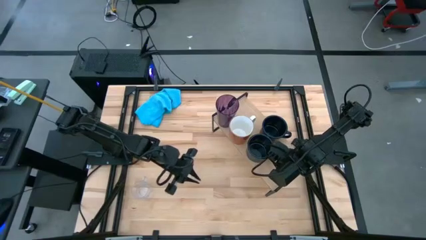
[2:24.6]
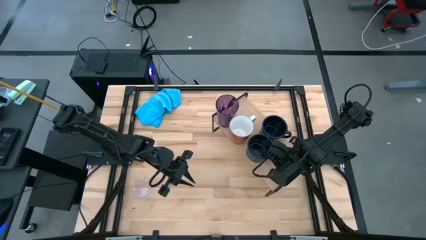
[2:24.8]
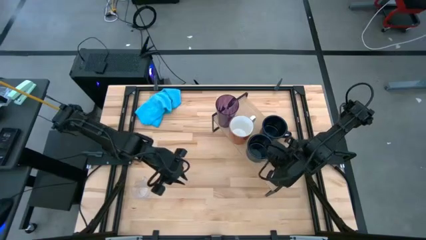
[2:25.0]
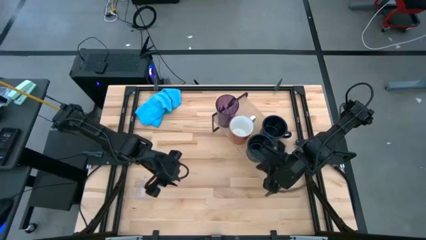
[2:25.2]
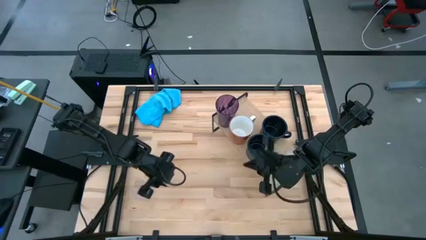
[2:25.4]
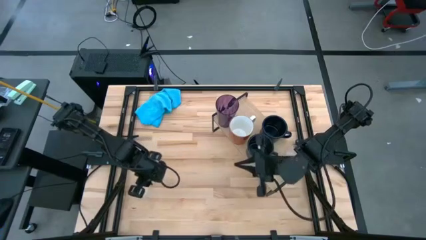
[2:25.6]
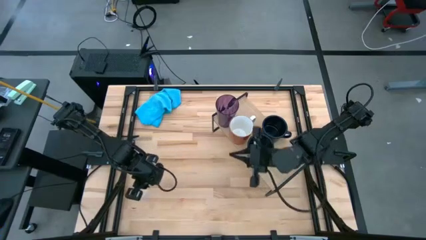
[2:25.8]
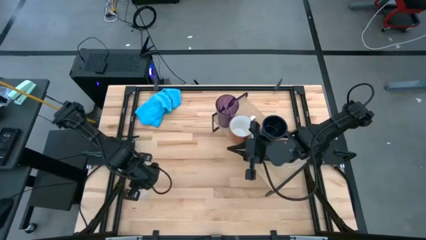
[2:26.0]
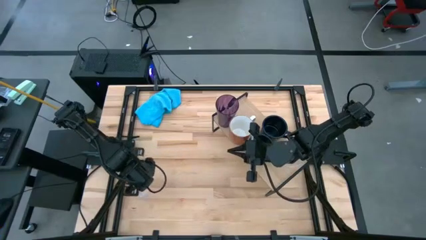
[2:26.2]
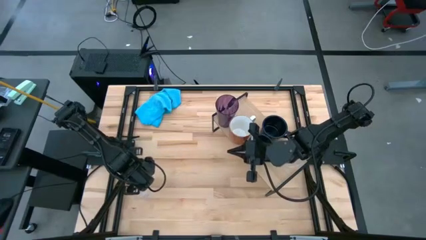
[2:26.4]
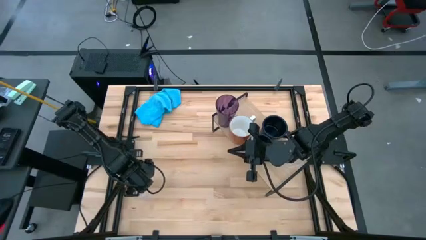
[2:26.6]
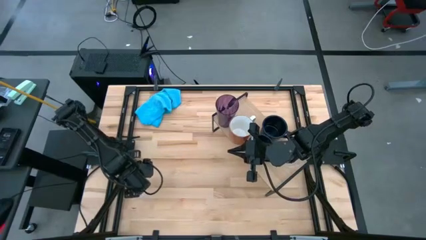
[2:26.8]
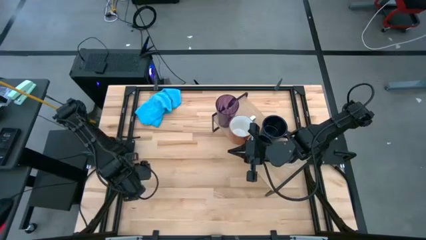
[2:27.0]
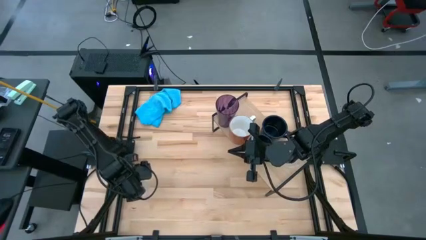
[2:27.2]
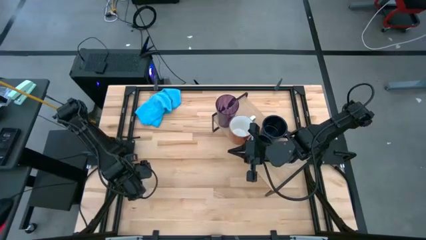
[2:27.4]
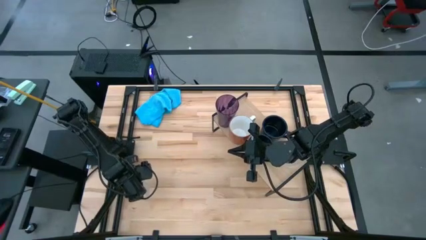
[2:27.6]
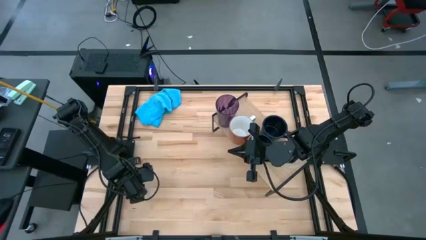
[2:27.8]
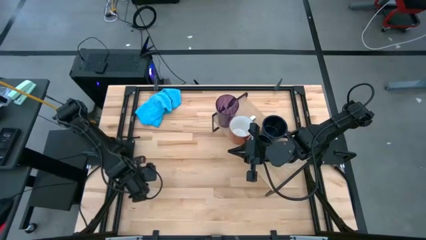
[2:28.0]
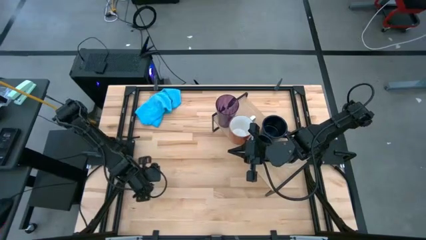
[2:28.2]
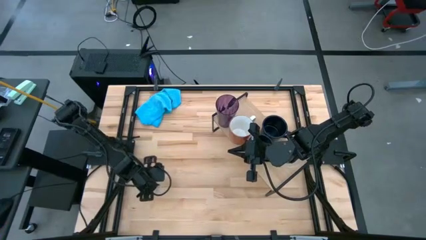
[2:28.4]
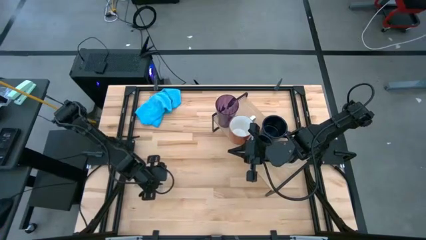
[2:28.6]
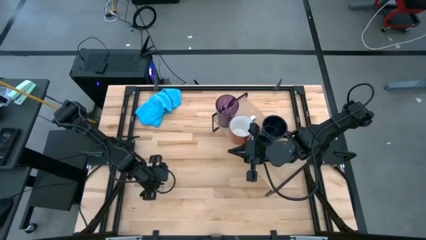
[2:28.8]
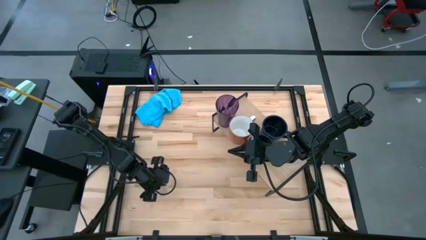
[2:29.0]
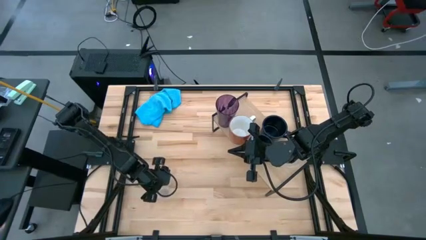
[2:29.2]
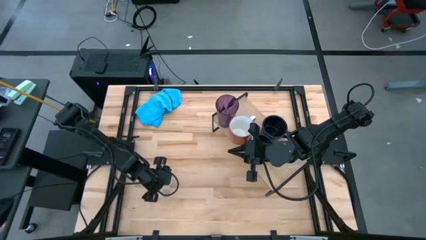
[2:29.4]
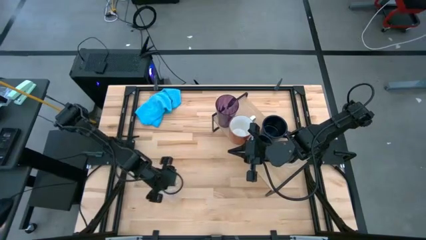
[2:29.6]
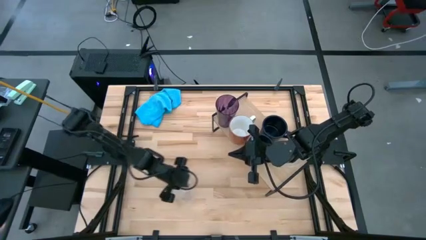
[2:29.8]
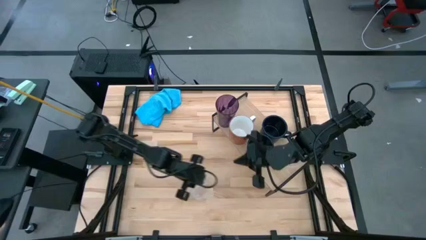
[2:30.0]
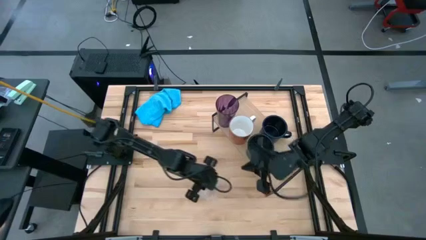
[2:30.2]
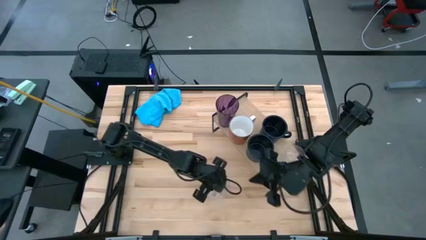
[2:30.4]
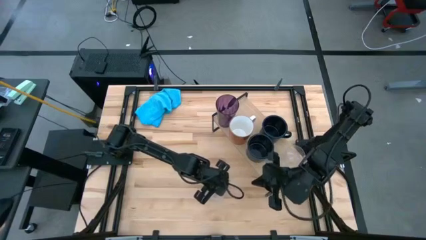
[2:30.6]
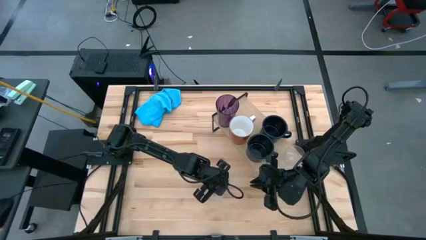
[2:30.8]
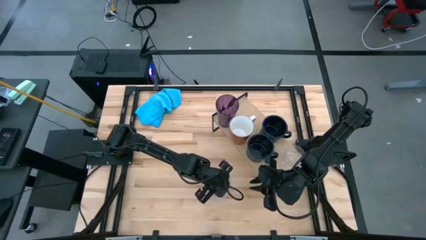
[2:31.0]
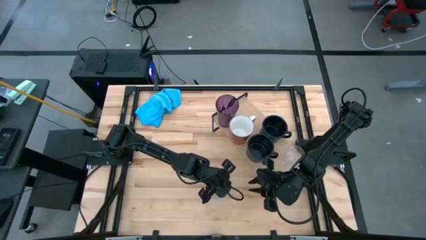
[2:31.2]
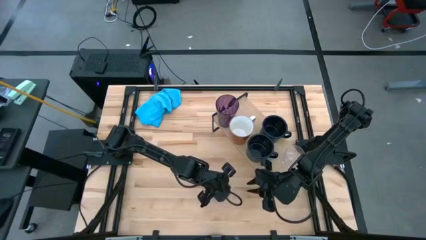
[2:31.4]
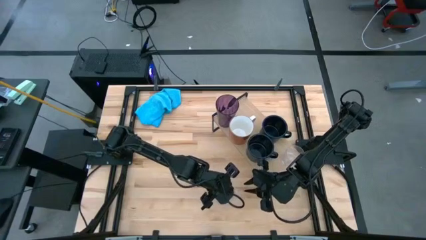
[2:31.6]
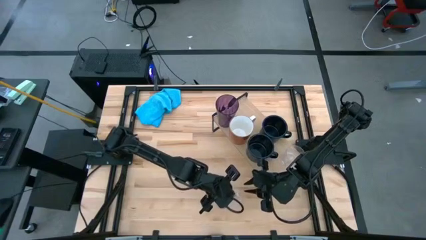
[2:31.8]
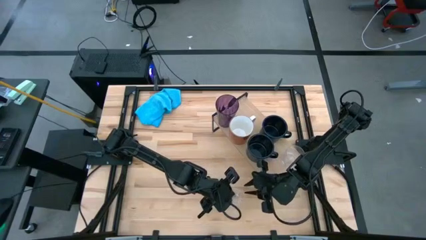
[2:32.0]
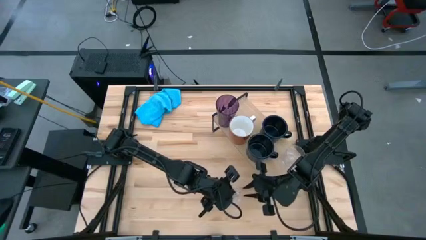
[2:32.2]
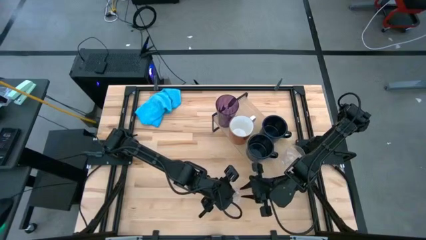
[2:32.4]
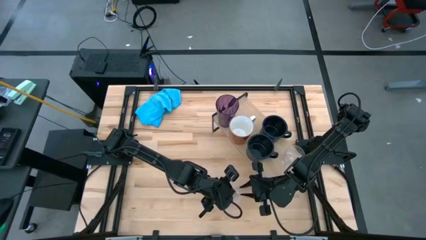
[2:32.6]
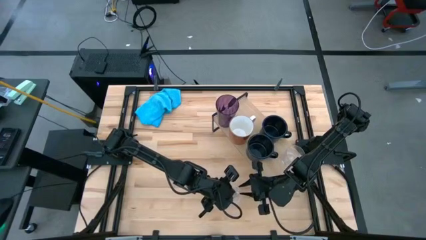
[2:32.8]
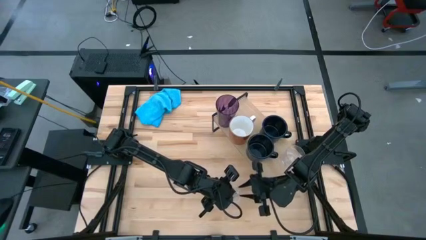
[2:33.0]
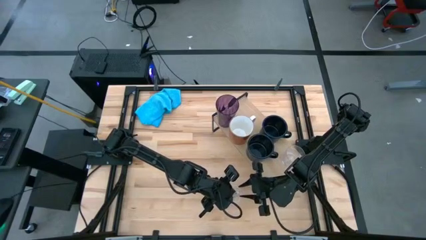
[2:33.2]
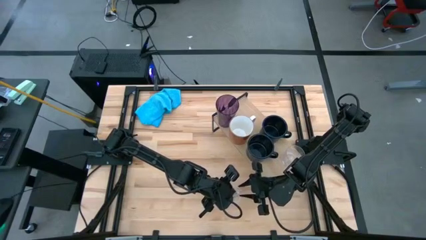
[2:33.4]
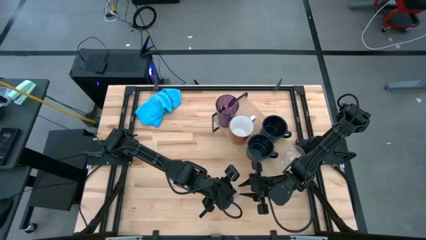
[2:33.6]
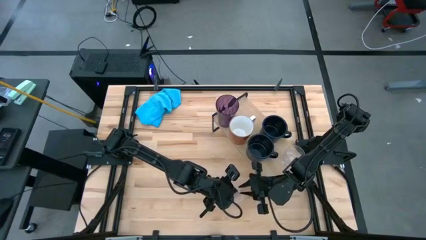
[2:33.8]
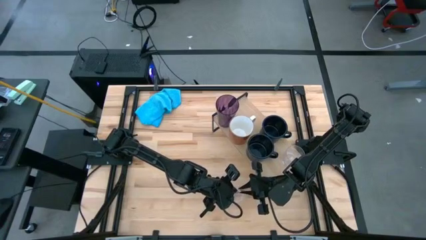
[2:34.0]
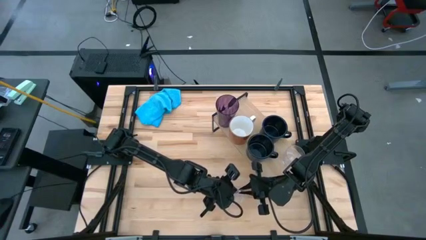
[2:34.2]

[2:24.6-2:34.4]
Task: Stack small to large cups/mugs on shelf
Put the transparent mug on the shelf aligned with the other transparent mug

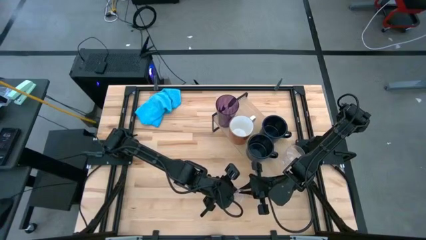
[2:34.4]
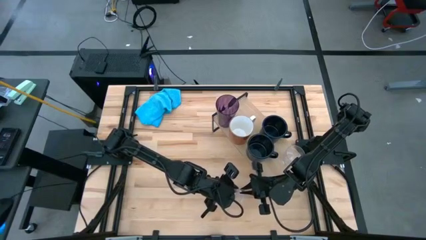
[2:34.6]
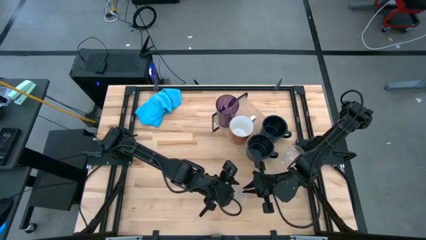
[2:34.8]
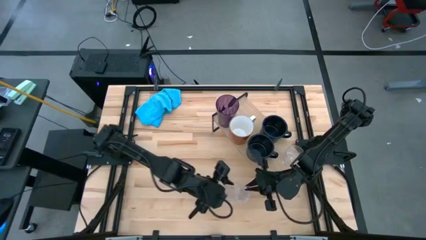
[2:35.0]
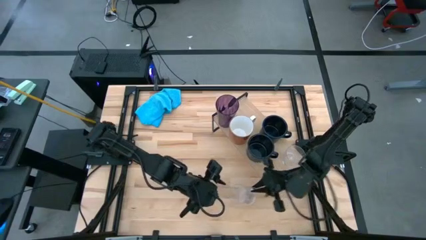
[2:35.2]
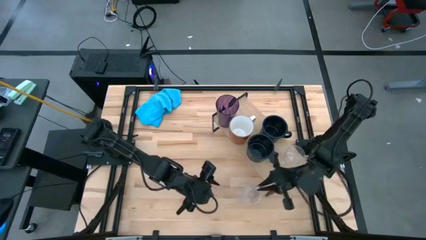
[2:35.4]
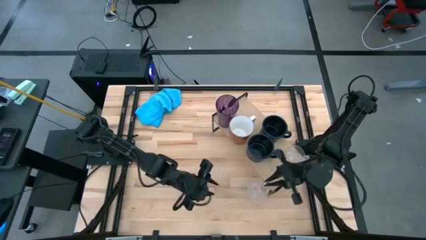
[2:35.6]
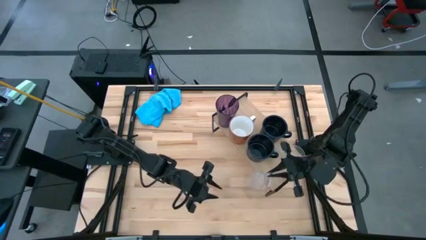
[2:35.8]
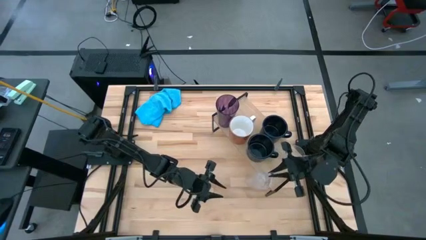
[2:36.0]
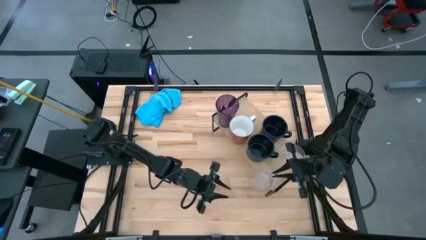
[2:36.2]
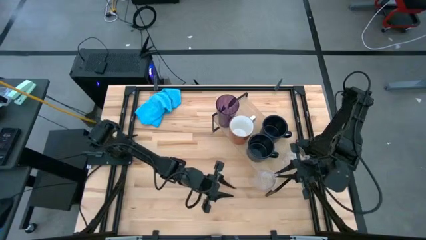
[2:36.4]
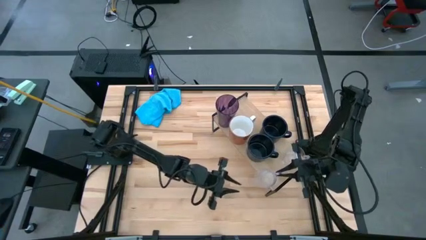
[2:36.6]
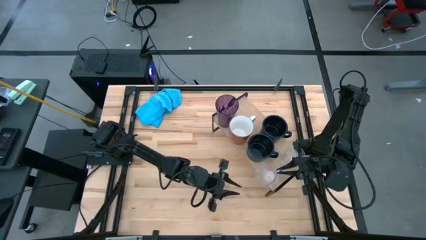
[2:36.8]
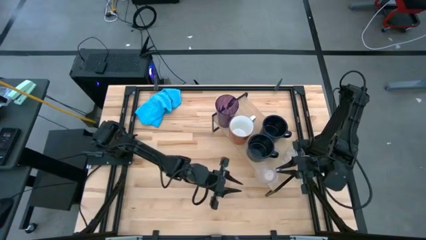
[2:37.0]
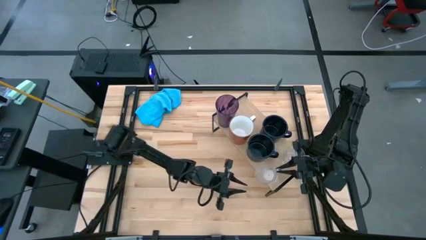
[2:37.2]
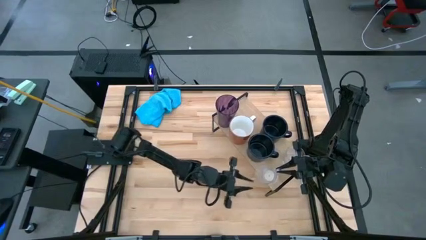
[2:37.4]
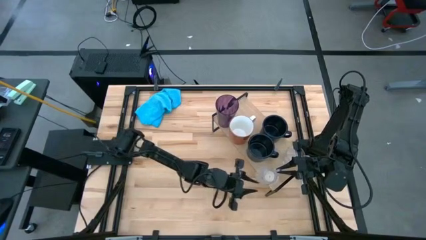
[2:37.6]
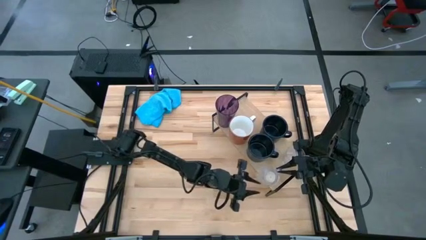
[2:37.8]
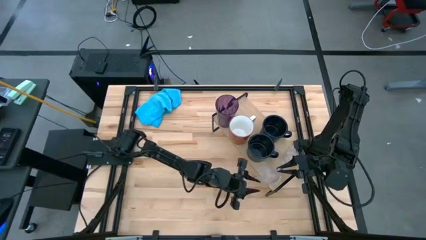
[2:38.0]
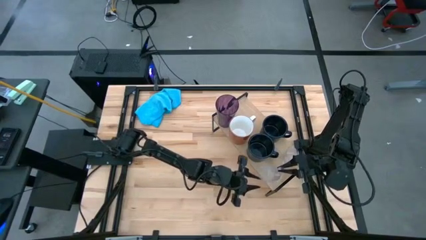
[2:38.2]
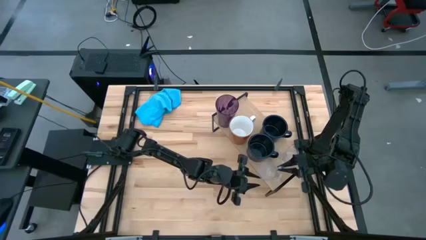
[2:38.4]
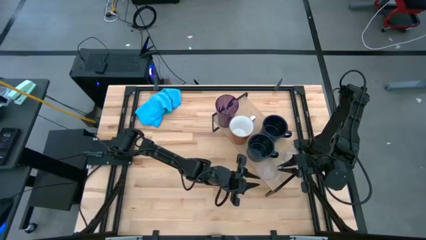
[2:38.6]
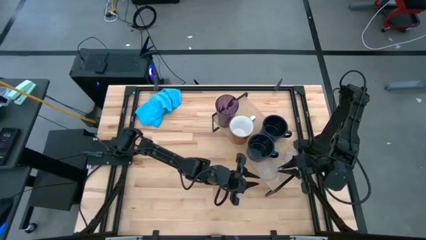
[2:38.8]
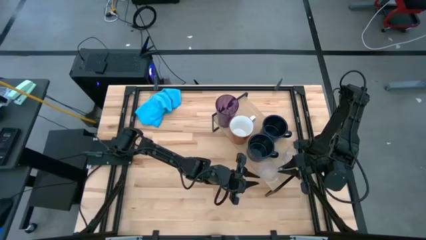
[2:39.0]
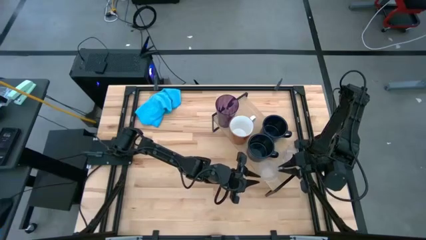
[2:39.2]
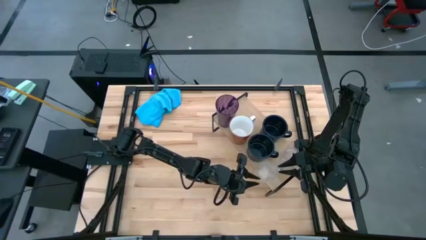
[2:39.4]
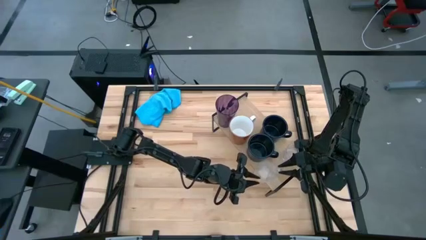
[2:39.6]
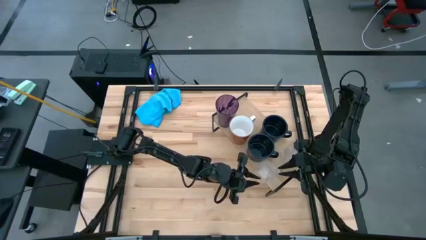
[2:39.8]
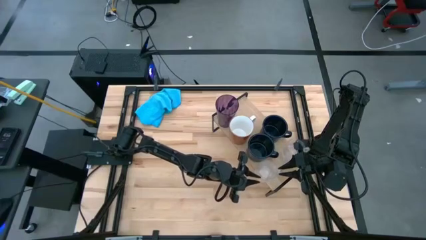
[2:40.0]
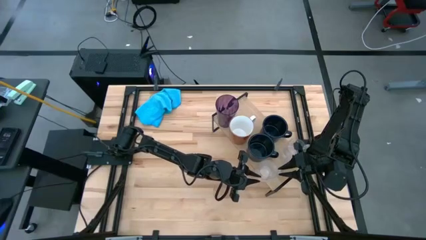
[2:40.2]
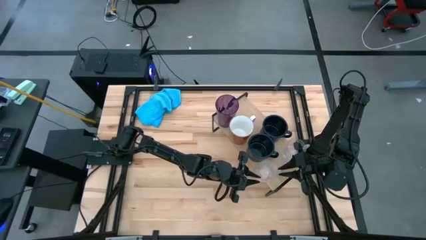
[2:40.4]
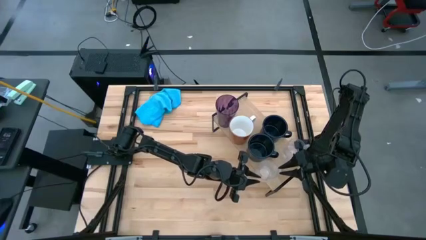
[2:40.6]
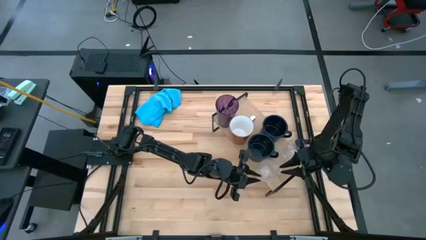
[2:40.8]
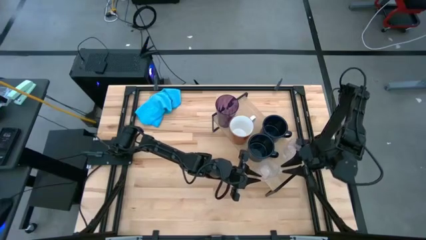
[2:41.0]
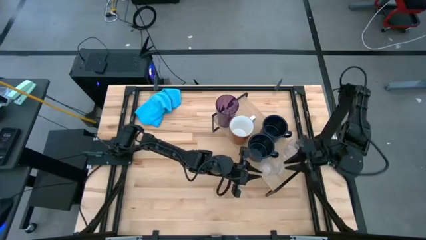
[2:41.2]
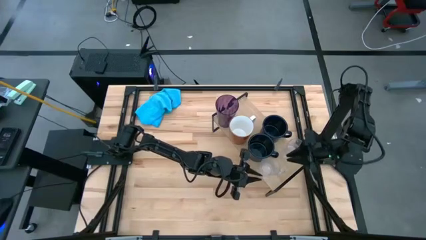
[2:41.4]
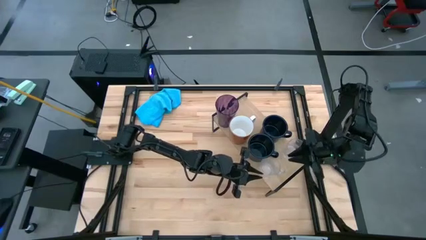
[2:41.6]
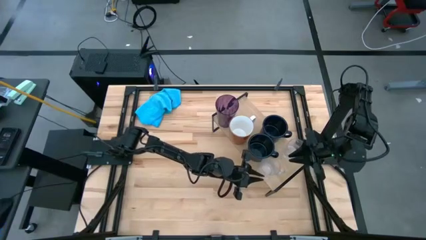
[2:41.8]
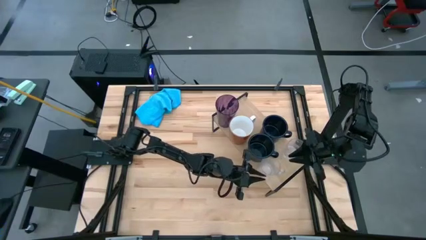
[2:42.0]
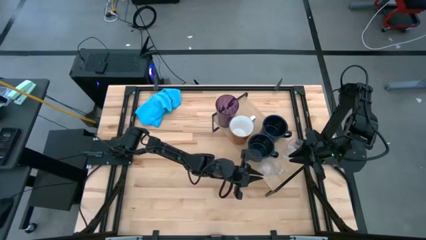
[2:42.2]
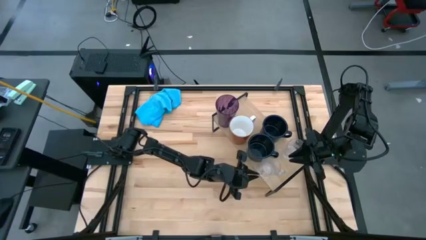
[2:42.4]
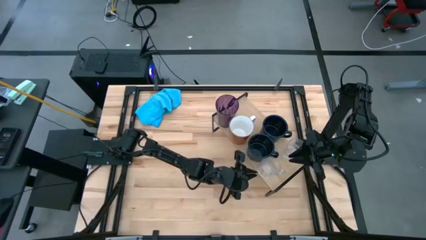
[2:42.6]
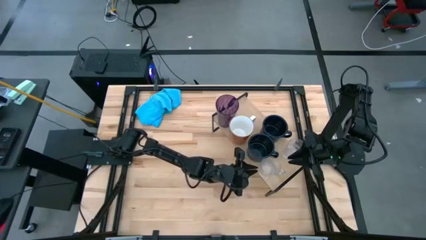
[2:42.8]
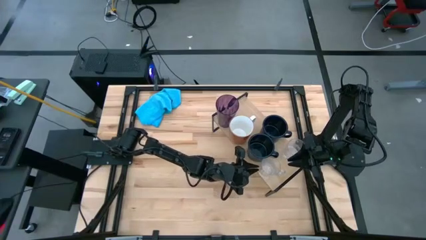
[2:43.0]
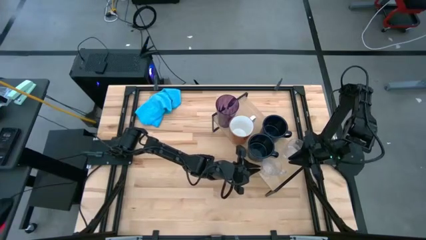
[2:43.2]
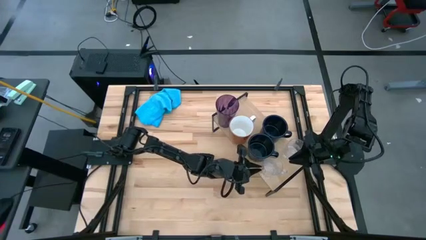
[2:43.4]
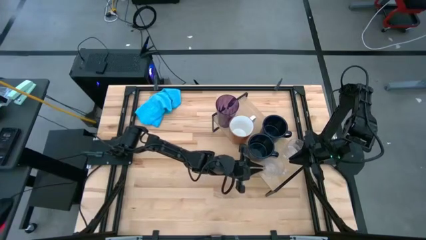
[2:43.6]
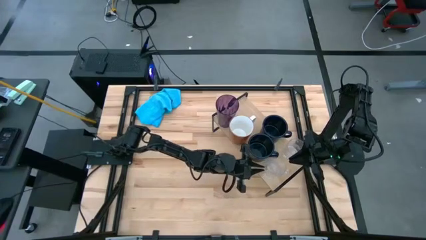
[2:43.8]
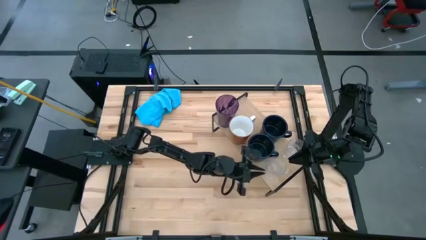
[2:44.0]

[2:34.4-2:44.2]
Put the transparent mug on the shelf aligned with the other transparent mug
